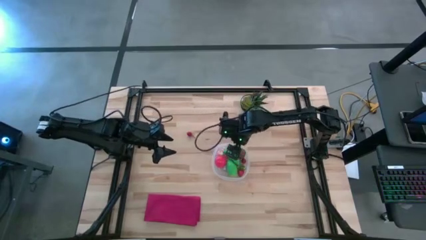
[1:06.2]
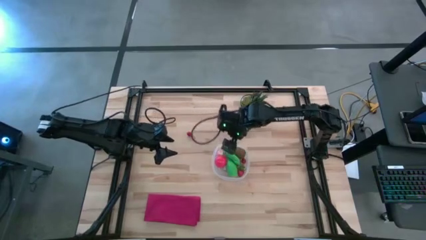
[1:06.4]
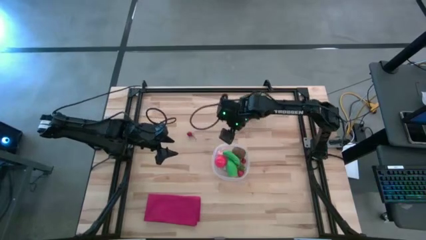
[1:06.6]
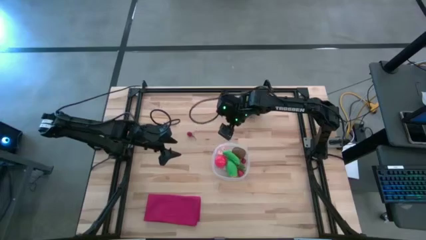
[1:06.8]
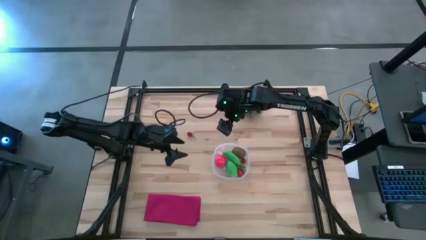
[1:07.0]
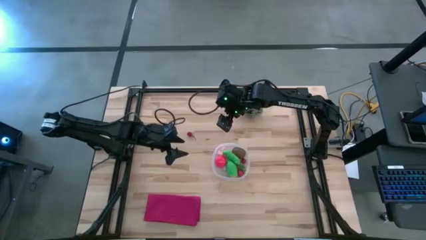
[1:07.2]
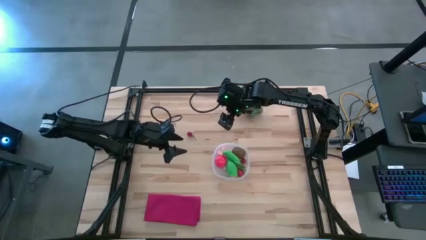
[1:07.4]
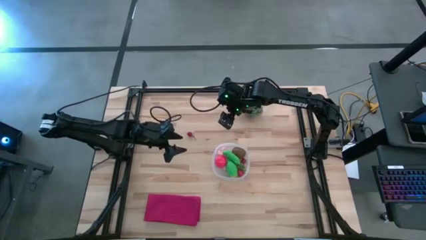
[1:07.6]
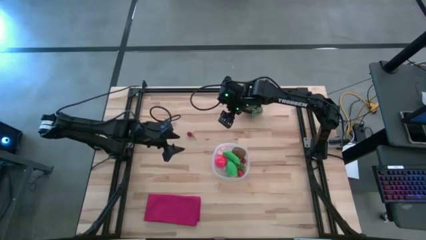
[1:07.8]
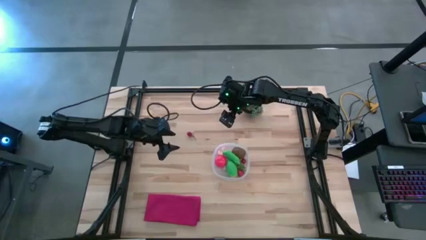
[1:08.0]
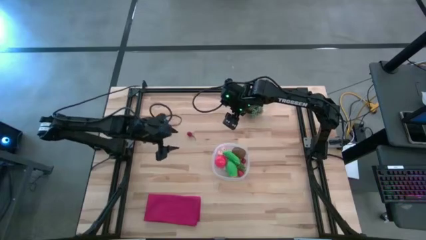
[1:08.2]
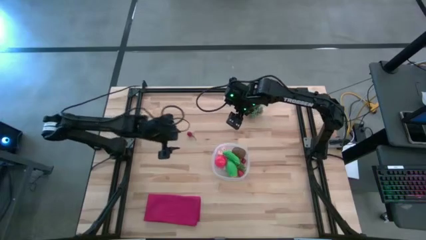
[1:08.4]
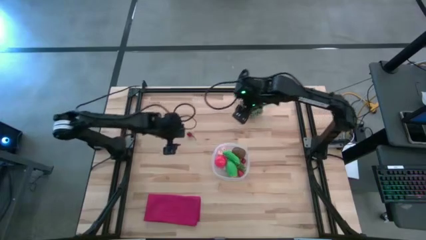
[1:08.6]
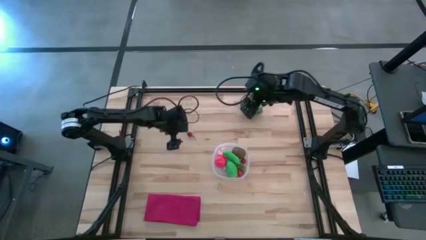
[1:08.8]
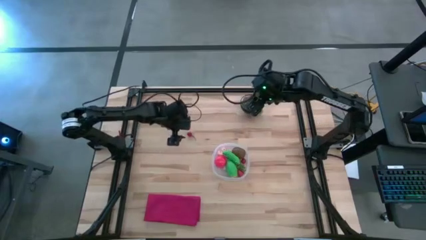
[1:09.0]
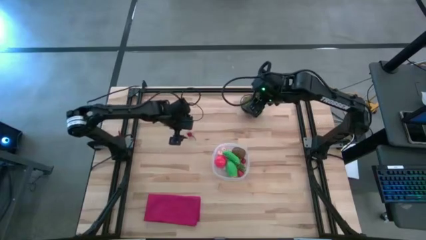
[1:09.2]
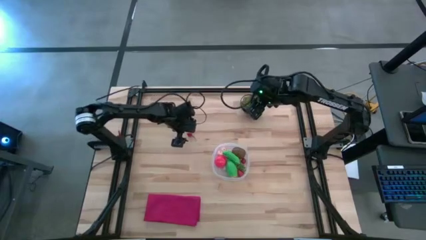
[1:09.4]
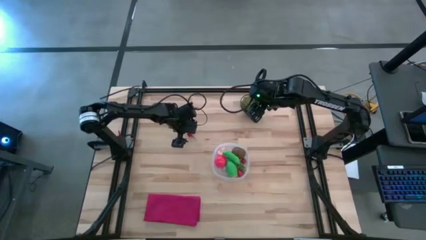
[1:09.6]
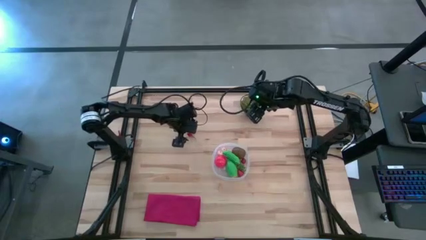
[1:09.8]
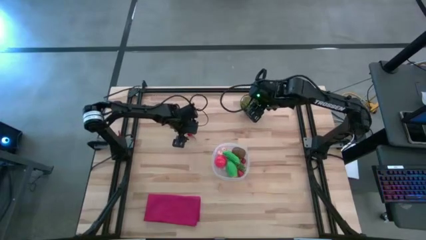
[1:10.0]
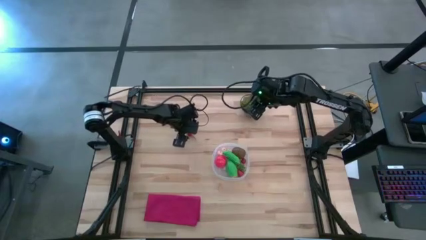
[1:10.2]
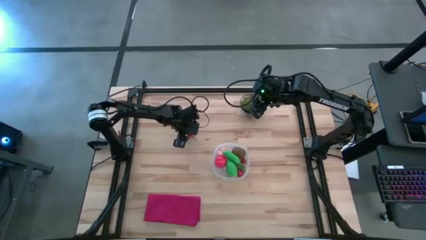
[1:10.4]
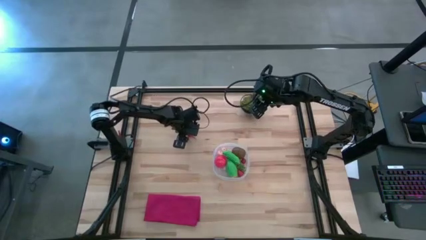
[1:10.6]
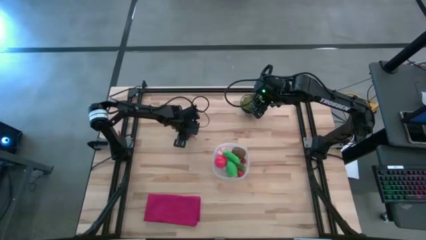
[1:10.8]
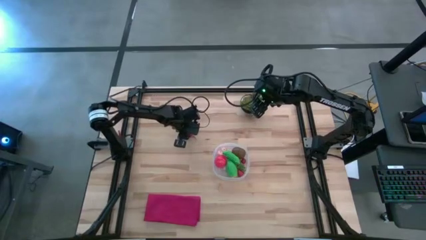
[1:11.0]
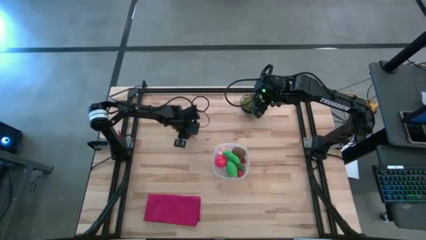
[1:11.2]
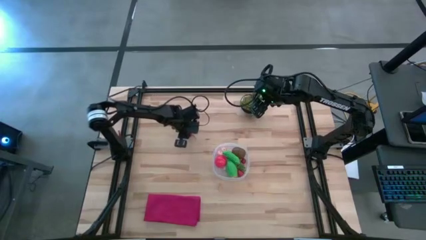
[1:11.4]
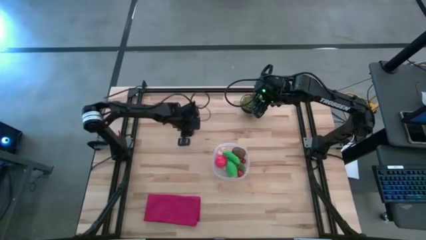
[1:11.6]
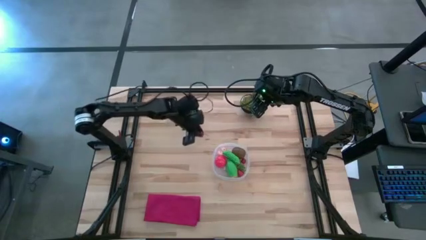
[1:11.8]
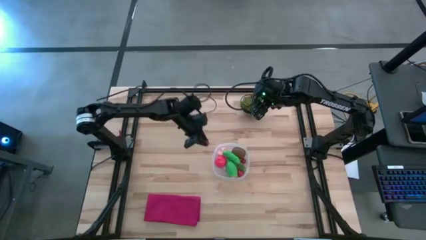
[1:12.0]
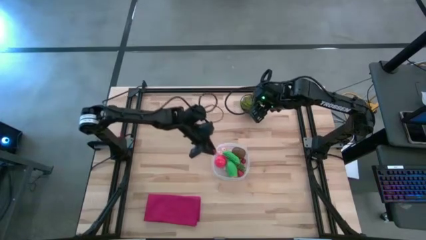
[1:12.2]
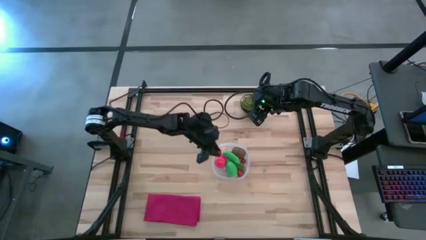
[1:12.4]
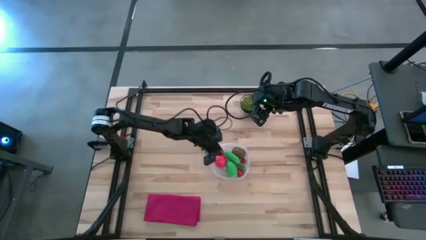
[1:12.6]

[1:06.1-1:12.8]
Task: Pick and placing Produce into tupperware
Put the cherry into the transparent container

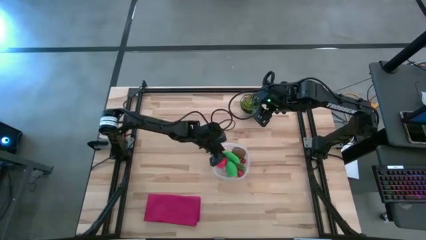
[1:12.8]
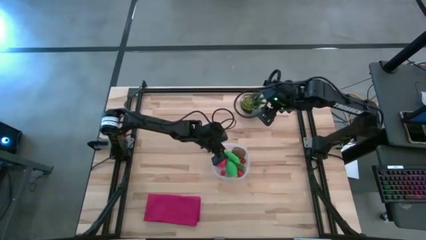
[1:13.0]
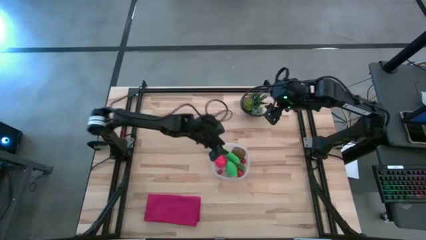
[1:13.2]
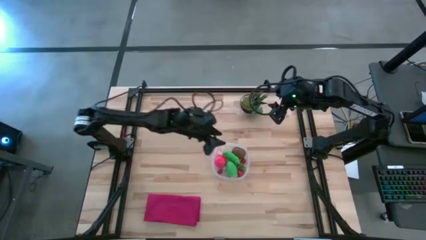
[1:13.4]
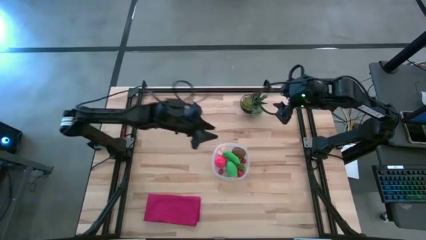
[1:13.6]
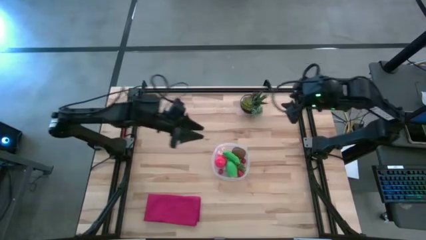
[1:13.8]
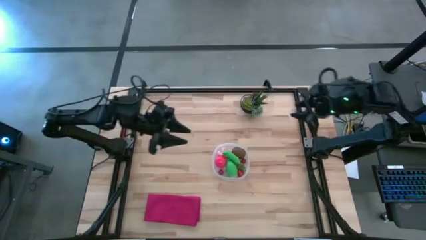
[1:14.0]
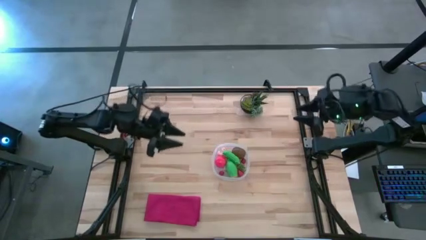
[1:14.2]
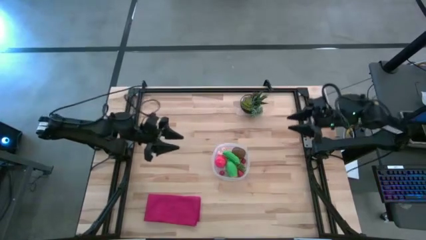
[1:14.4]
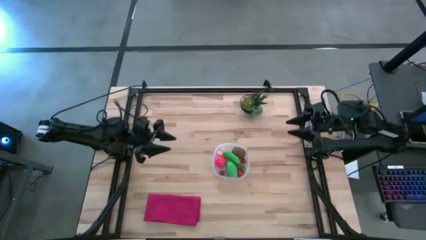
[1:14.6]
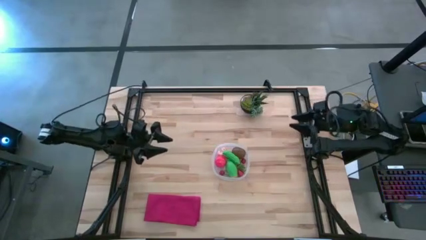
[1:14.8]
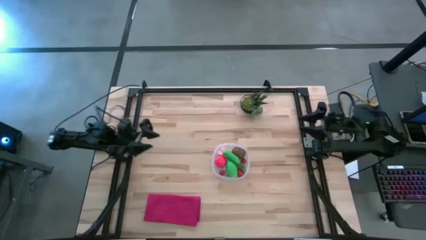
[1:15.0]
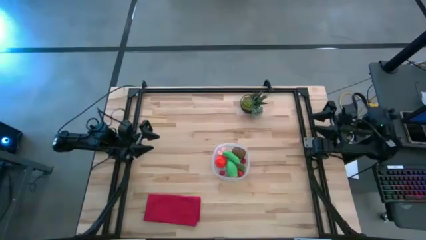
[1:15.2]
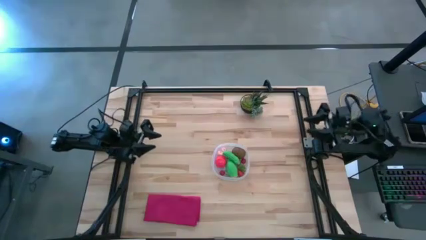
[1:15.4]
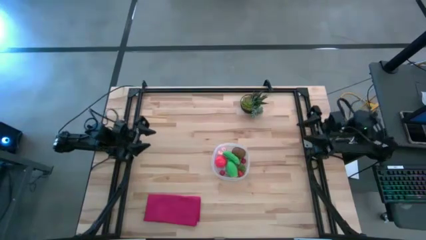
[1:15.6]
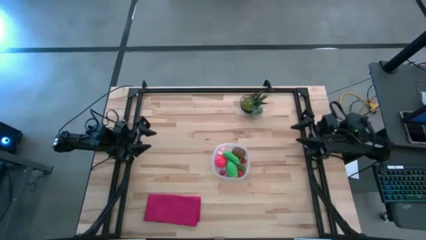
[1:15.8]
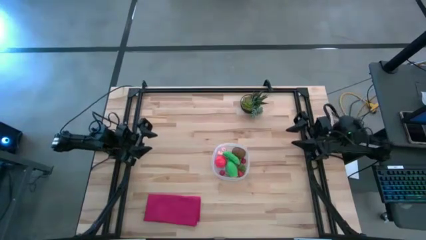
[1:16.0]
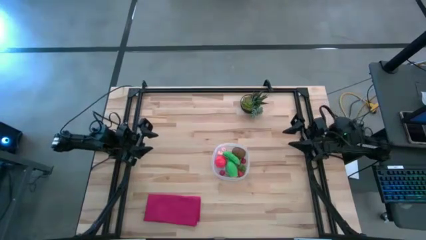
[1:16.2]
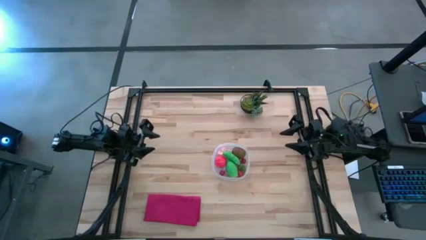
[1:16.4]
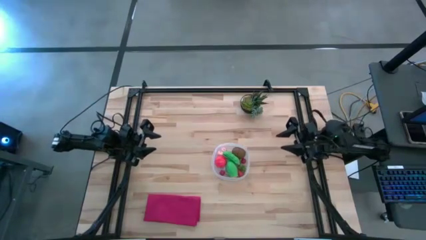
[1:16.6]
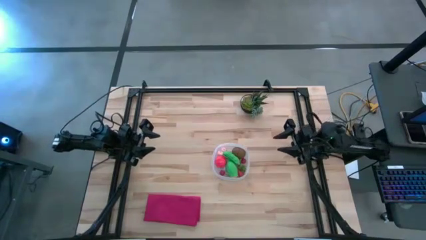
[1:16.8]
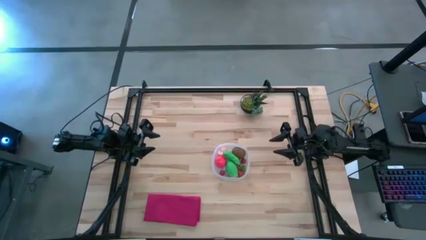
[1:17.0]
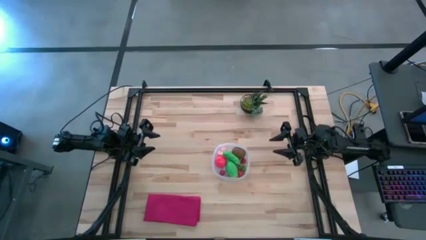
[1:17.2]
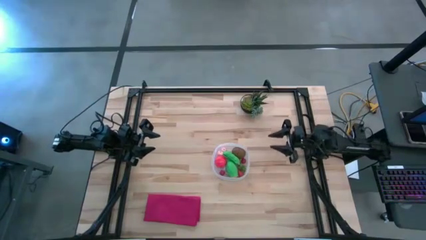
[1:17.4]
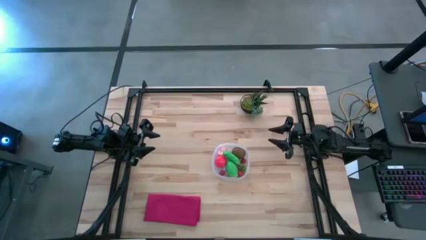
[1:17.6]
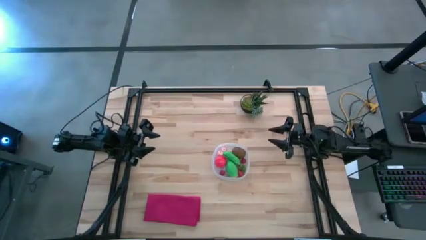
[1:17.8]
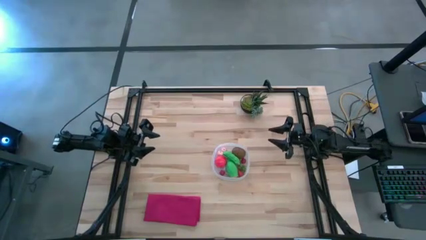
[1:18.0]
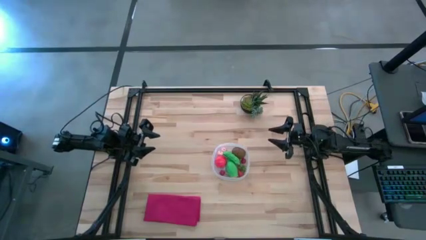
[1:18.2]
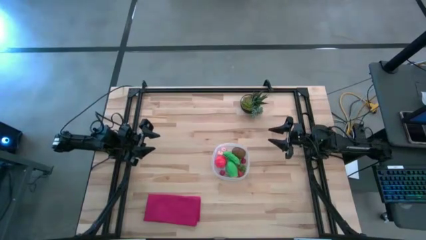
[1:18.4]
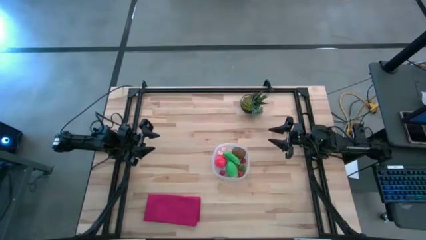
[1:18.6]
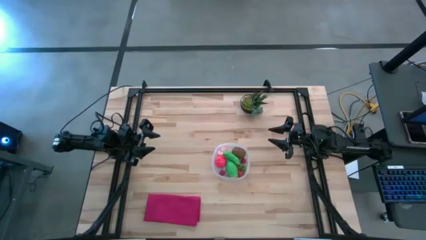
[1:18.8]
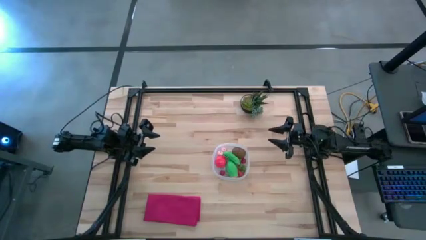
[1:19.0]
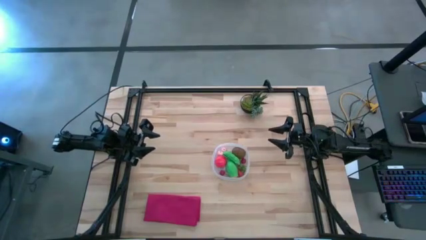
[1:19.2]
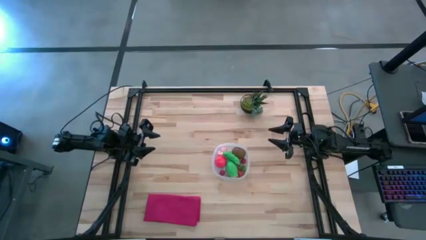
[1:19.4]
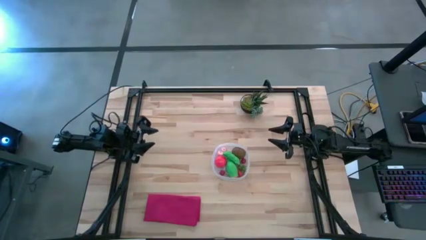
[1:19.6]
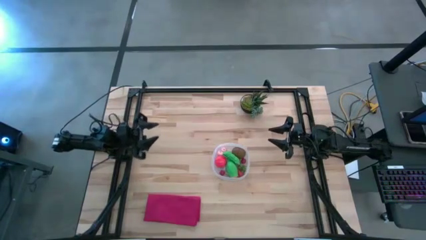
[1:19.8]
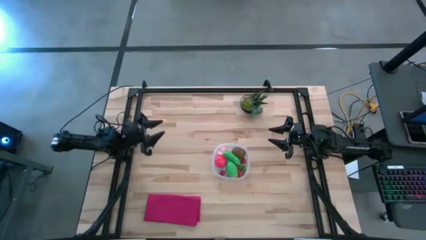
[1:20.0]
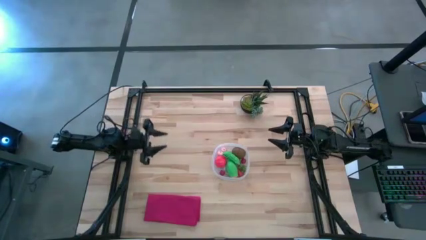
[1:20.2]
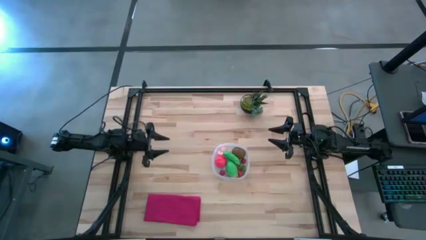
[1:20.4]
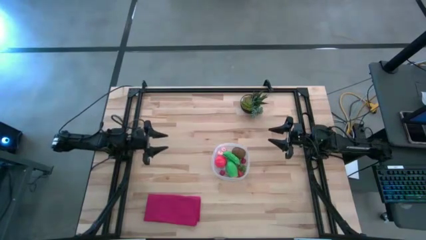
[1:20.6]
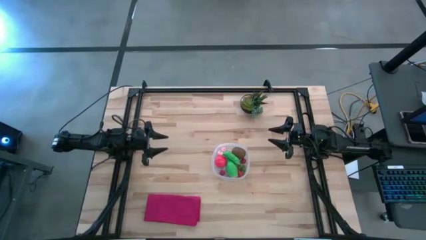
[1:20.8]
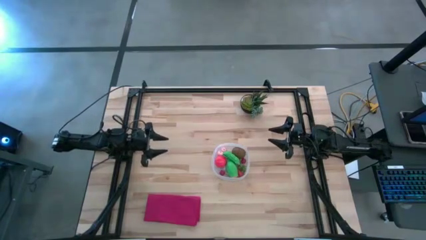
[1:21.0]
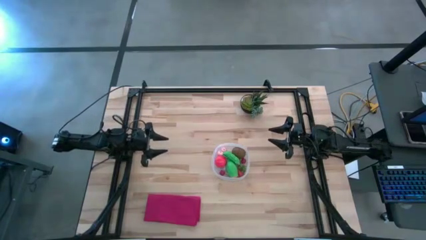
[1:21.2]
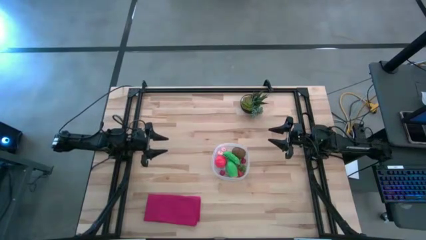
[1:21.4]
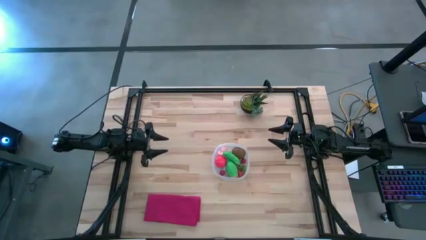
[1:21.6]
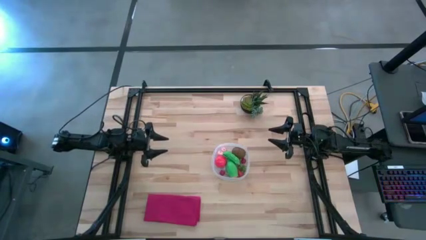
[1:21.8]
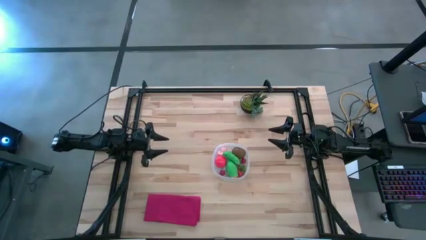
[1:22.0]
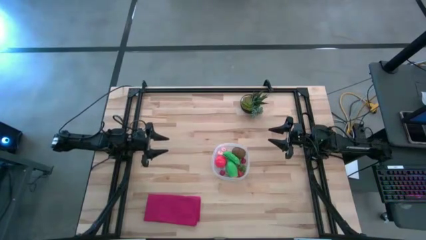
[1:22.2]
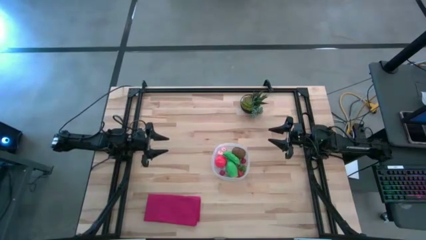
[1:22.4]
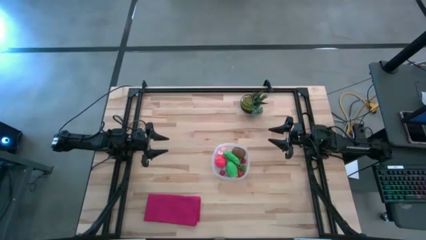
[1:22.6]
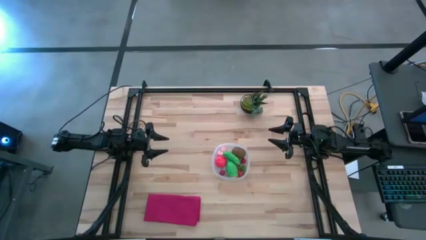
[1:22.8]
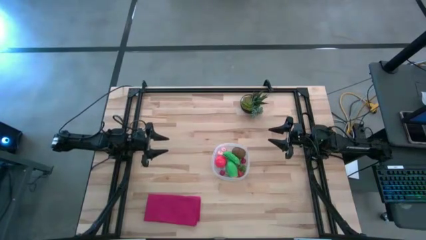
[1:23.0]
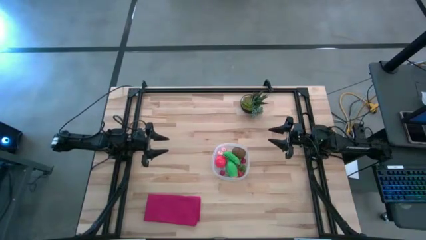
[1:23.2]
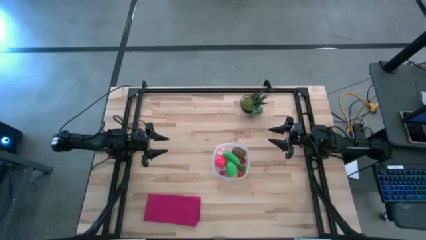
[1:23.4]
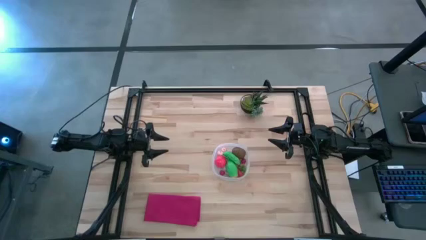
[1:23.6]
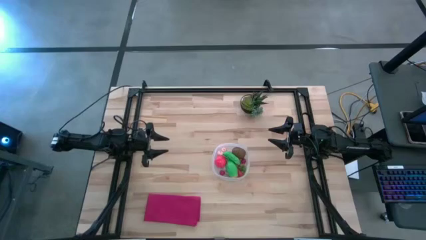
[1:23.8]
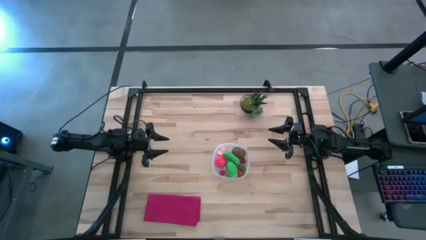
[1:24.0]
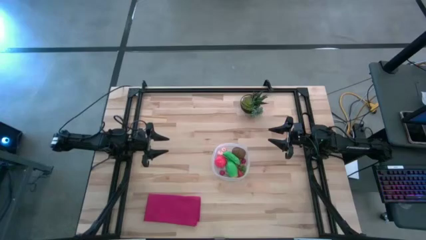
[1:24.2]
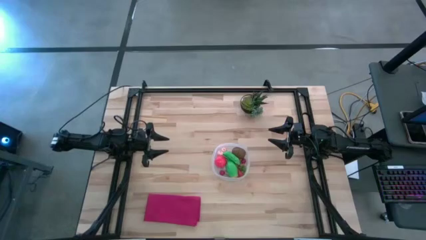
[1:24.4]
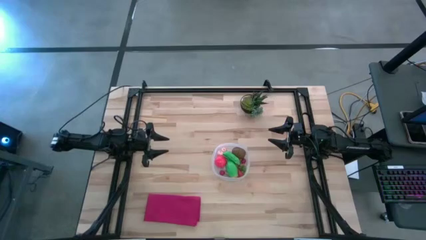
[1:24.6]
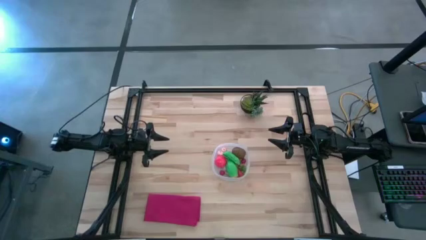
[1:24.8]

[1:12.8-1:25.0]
Return to Home Position
